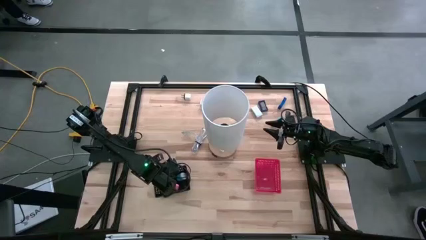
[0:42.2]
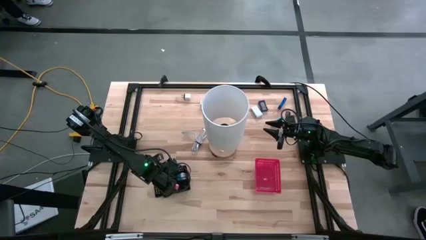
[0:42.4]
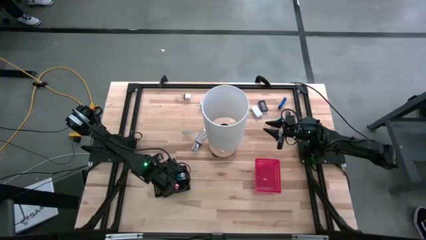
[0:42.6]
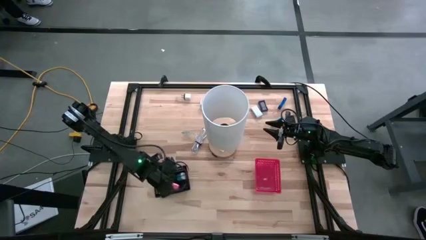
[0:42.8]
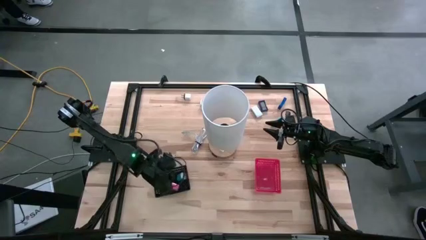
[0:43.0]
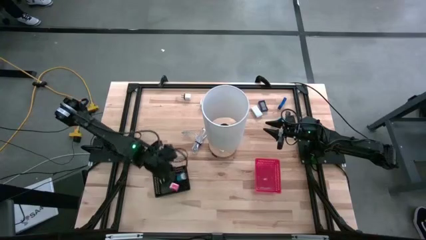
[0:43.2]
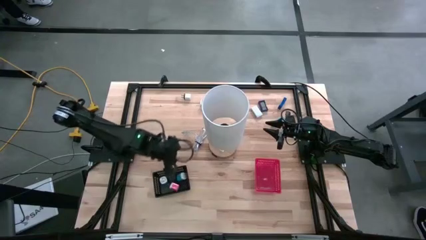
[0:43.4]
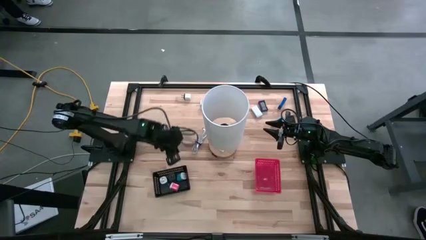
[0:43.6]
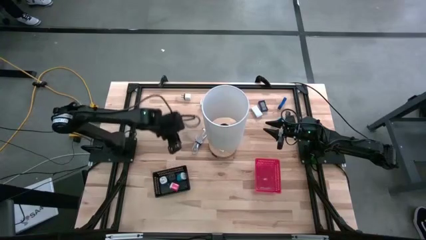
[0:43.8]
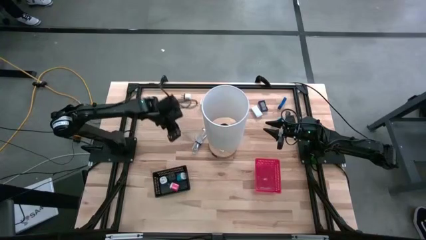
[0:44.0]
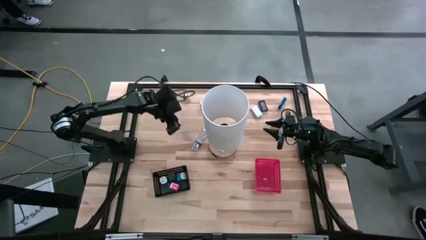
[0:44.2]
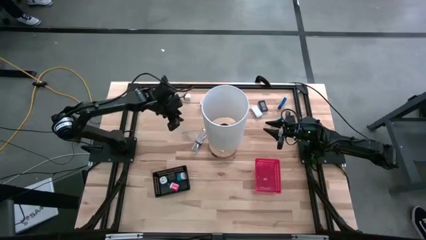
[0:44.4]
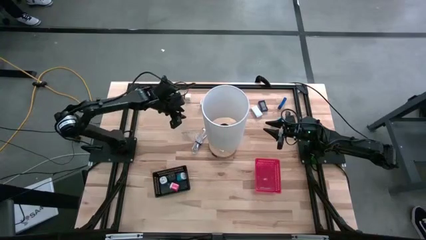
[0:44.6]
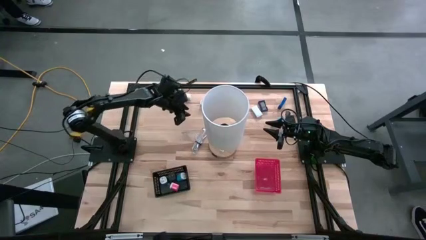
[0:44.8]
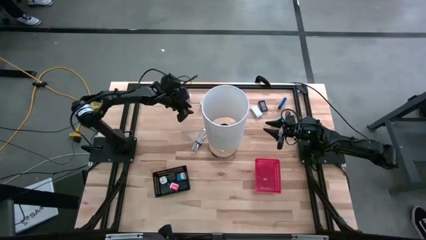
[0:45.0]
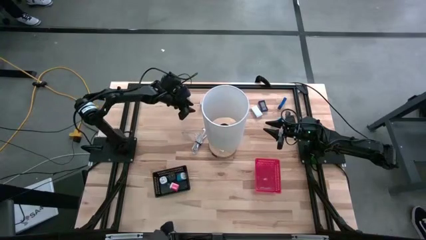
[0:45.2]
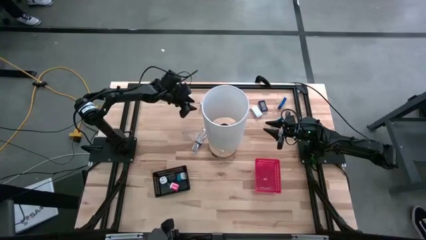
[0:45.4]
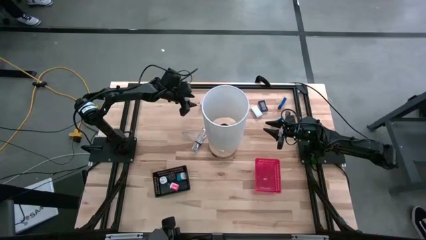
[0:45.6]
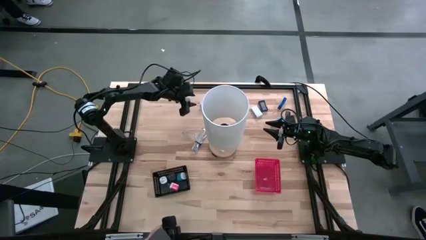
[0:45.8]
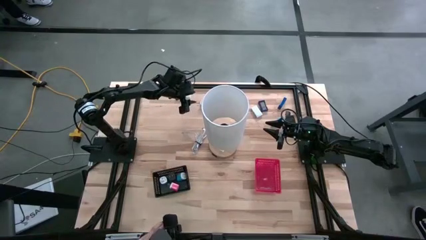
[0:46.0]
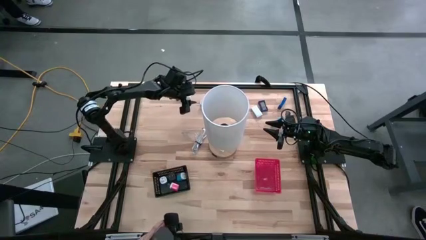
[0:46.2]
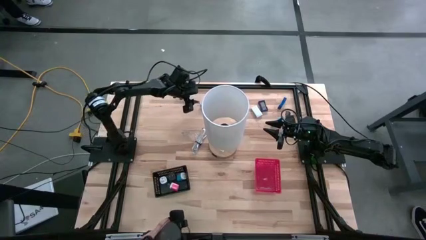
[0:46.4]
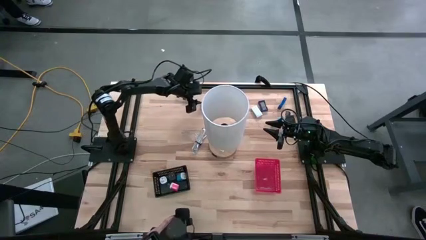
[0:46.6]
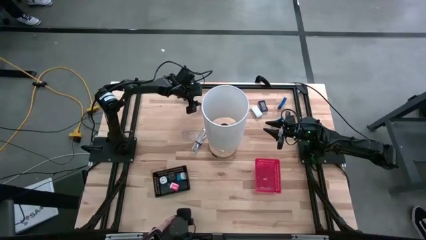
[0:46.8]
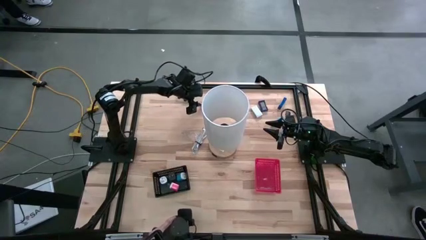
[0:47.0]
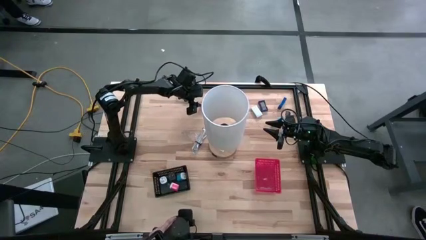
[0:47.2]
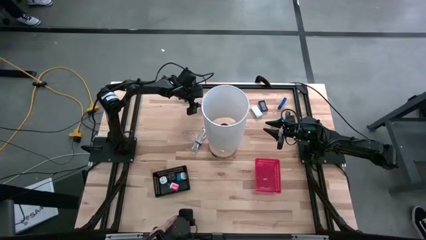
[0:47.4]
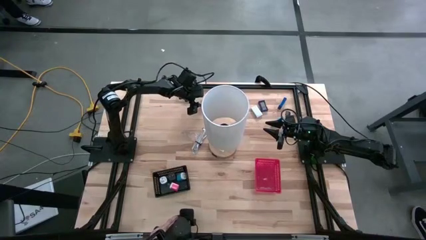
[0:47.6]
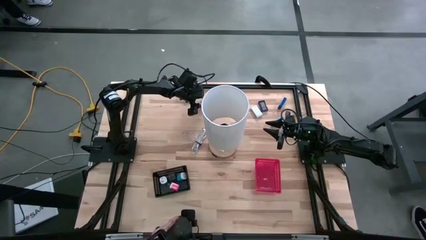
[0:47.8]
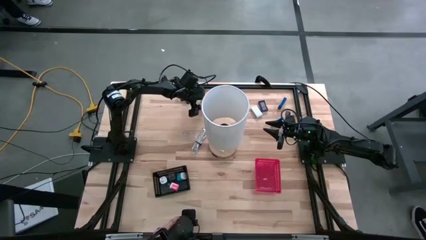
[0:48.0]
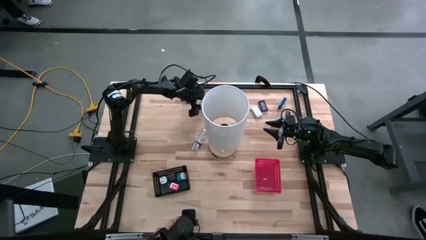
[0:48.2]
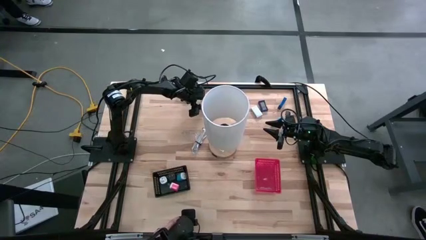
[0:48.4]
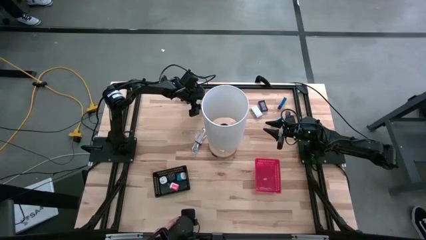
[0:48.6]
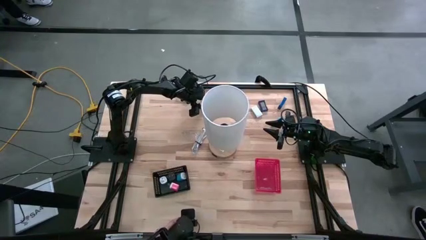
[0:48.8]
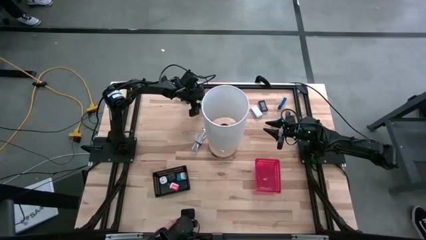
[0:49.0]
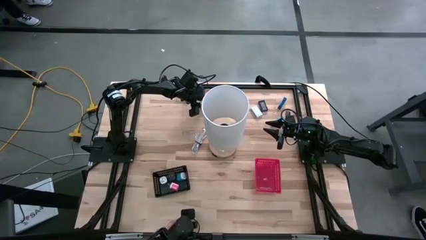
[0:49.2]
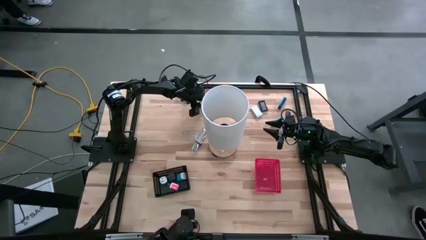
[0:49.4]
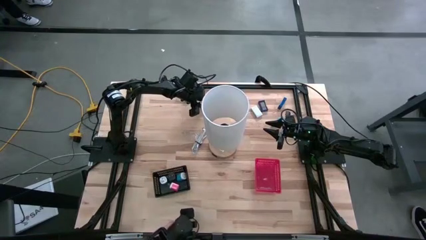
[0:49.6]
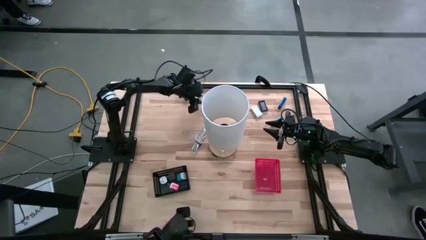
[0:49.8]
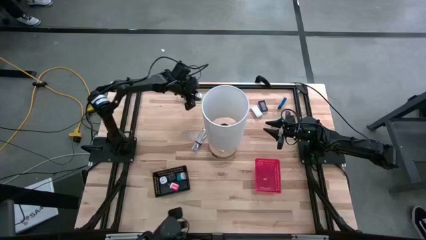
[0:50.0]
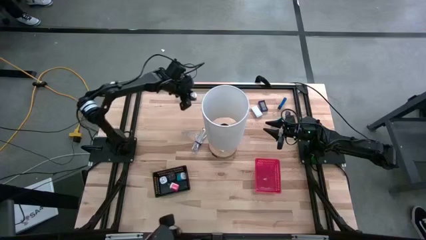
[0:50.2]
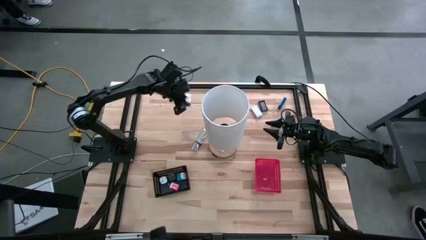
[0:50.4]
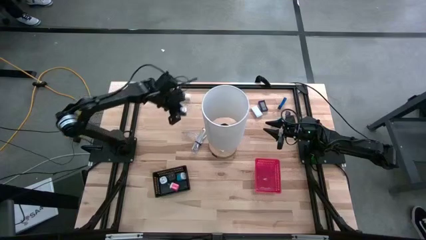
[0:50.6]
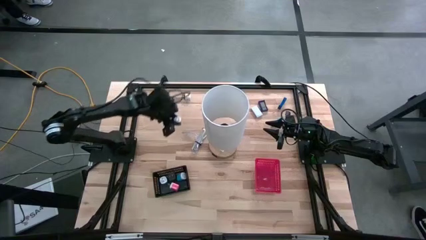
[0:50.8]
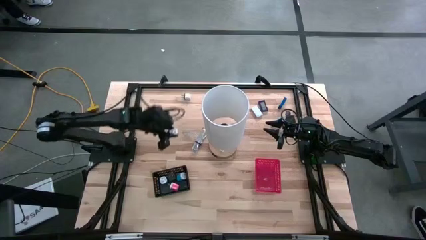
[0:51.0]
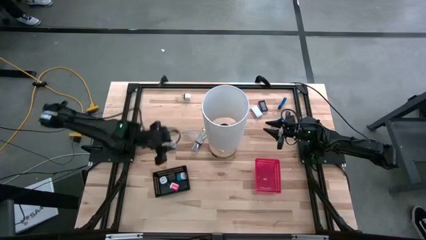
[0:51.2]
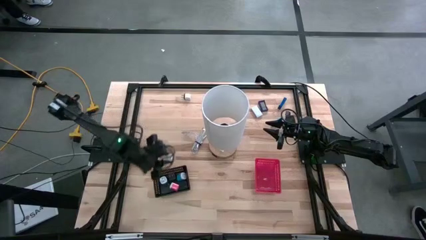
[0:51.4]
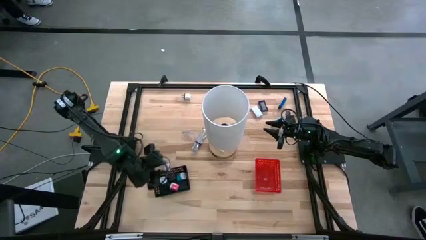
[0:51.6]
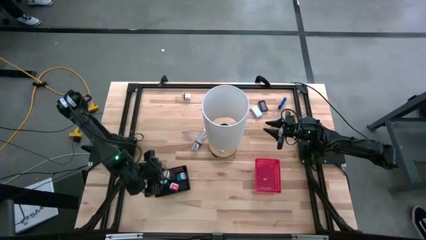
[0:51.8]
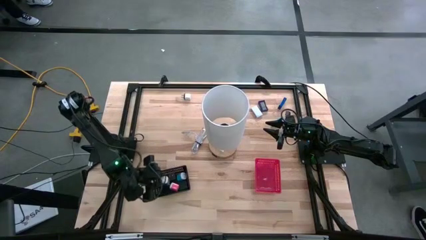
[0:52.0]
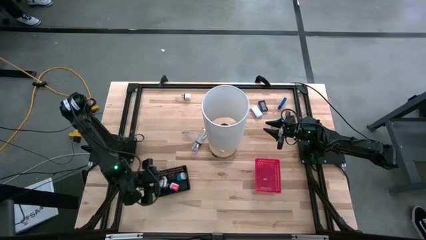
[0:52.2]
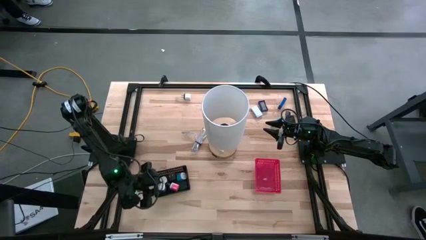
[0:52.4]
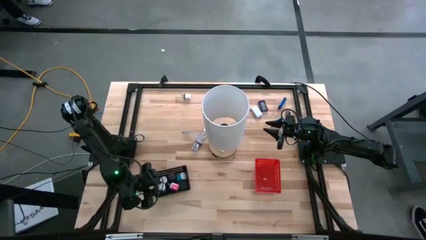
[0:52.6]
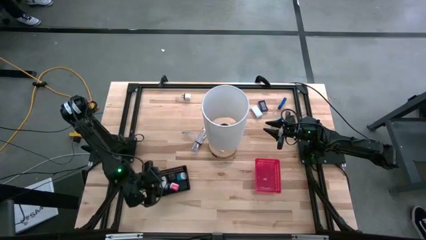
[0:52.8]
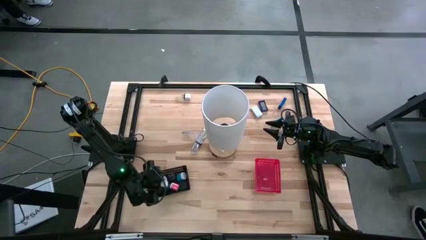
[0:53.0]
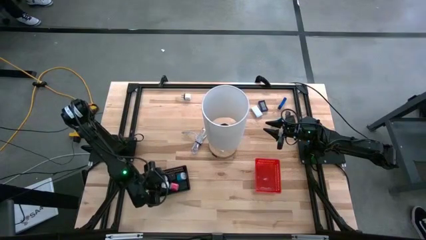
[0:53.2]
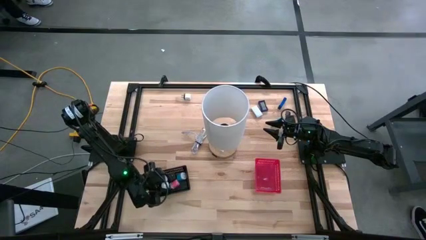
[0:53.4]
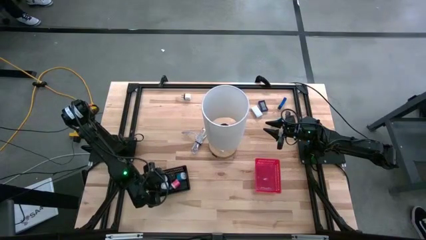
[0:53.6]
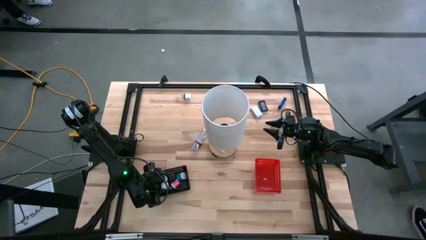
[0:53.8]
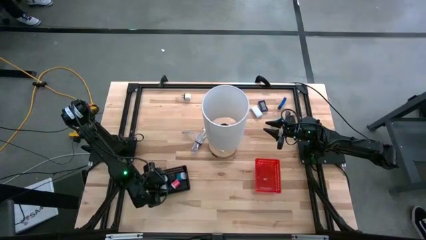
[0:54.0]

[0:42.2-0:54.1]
Task: Pick & Place Office items
Put the purple charger adapter into the black bin
